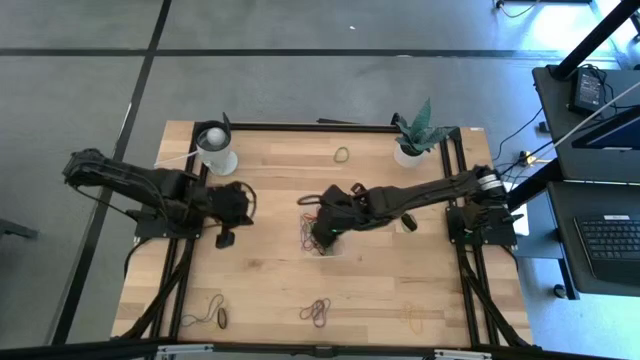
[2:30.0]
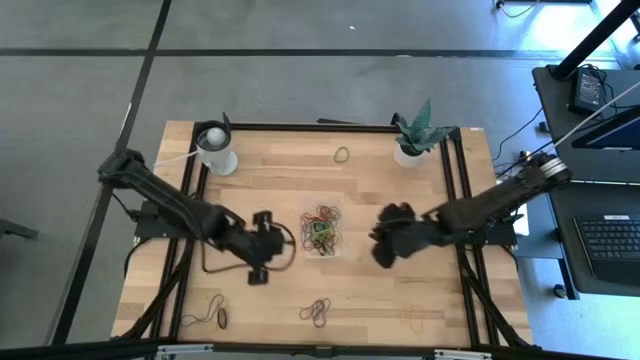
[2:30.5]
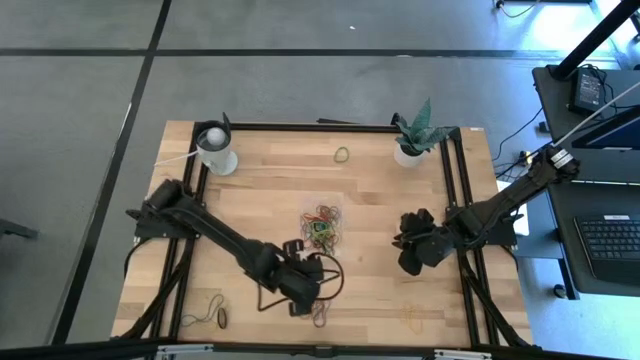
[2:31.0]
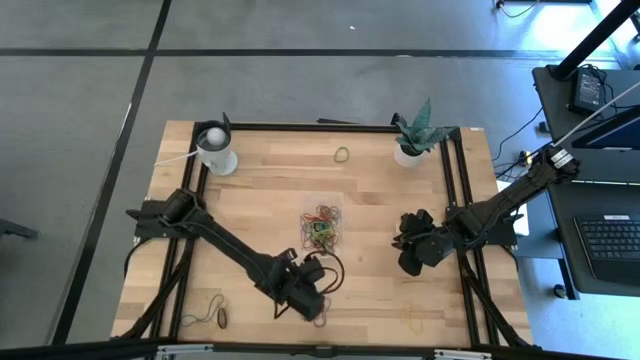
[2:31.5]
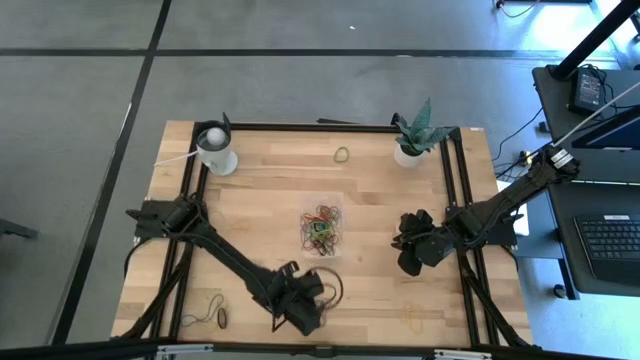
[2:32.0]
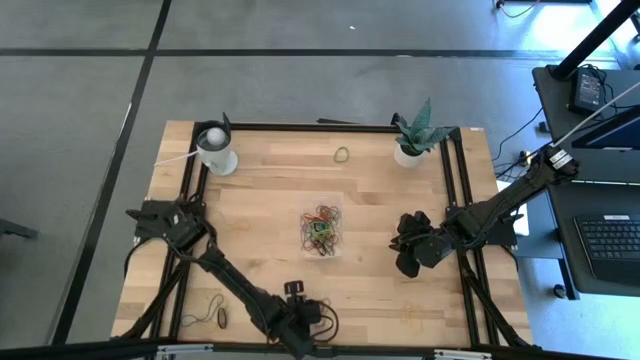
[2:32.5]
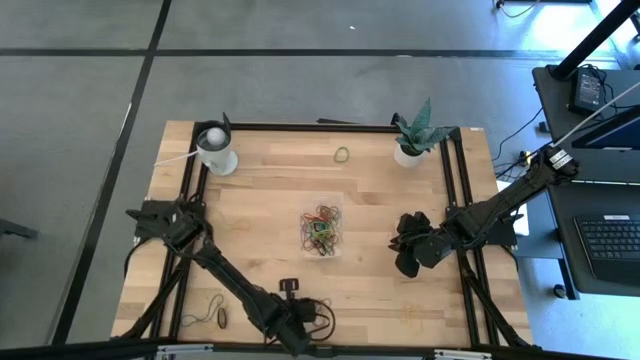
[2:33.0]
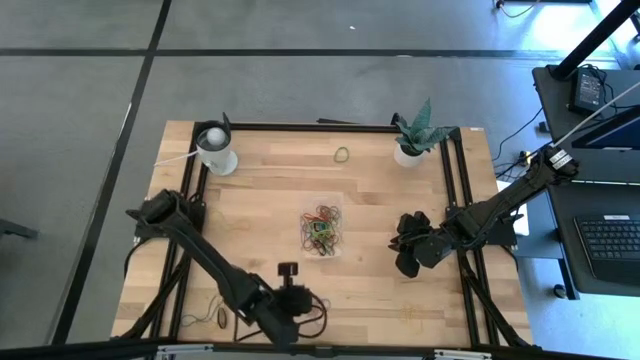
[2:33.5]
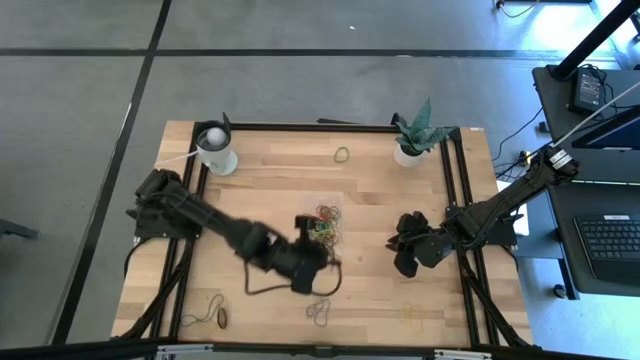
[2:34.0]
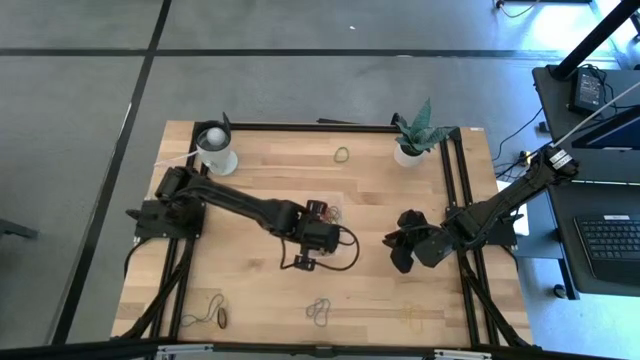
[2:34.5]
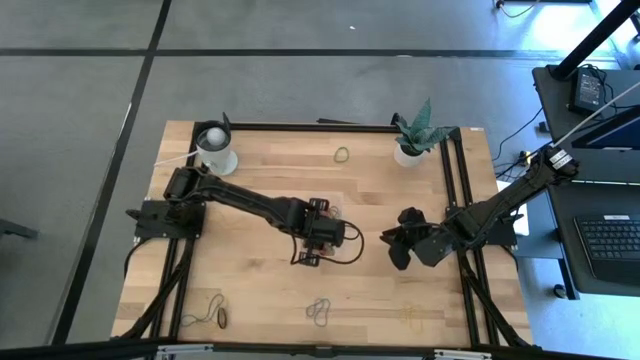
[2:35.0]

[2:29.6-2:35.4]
Task: Pick and place rubber bands into bin
Put the red rubber band into the transparent bin

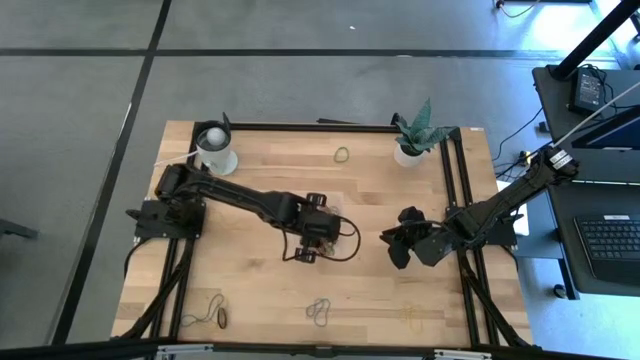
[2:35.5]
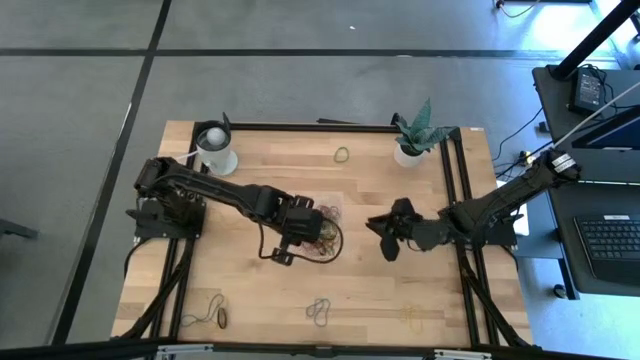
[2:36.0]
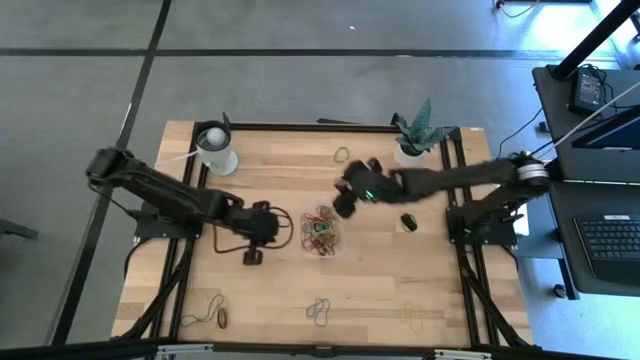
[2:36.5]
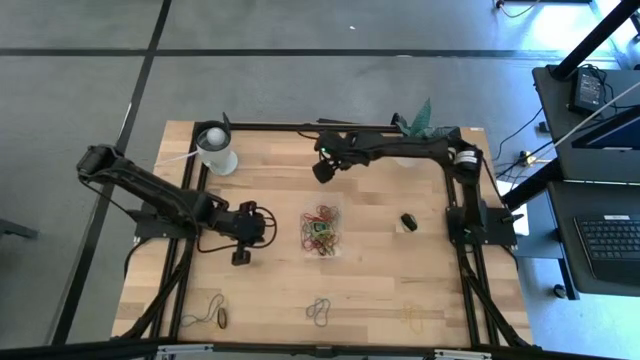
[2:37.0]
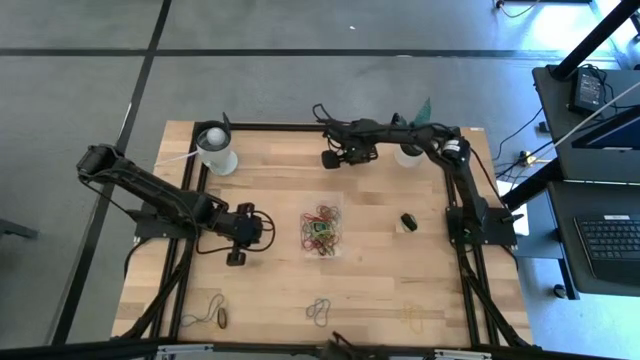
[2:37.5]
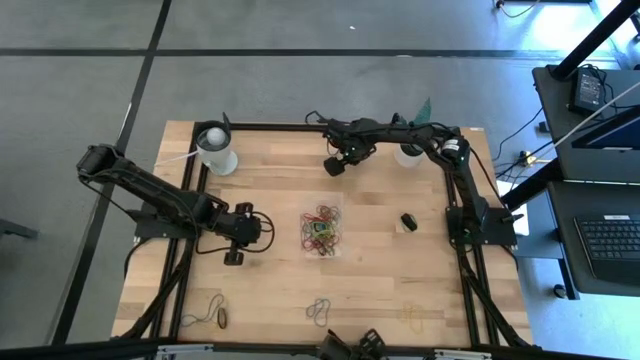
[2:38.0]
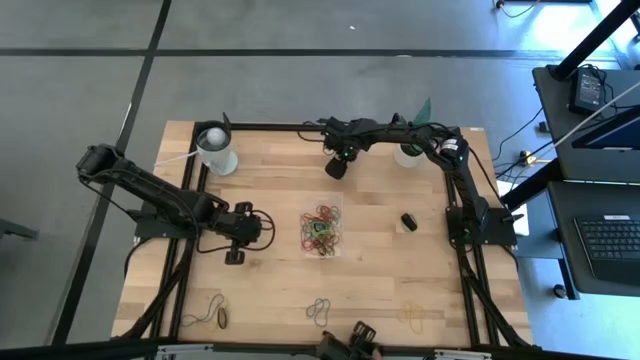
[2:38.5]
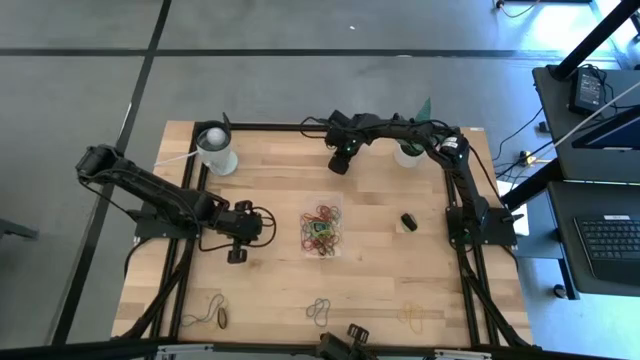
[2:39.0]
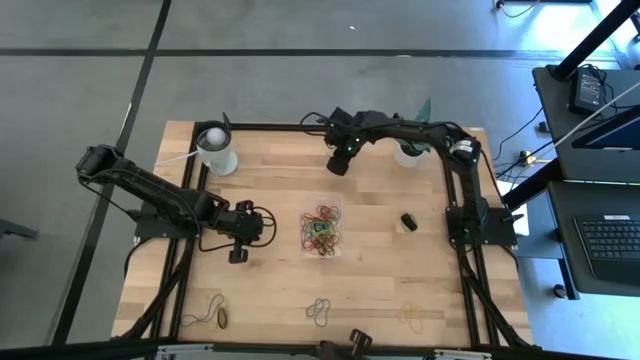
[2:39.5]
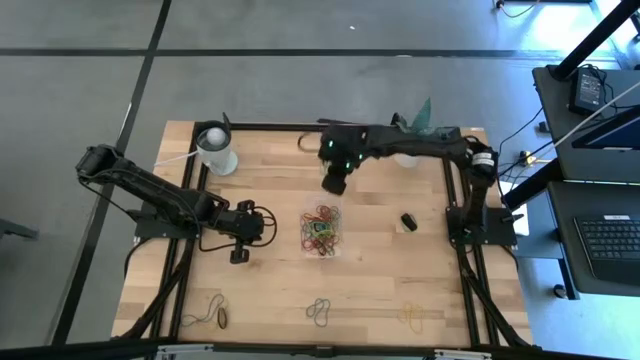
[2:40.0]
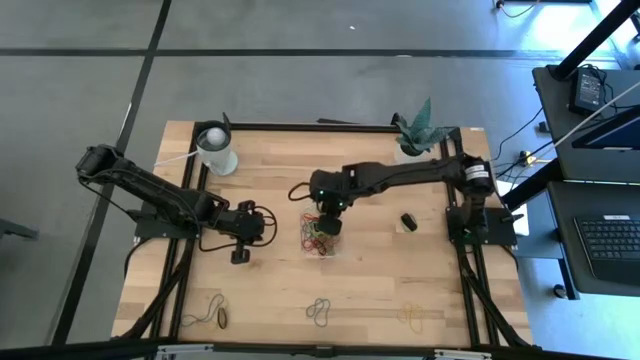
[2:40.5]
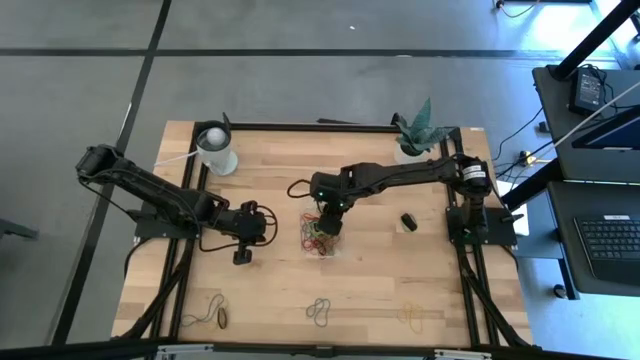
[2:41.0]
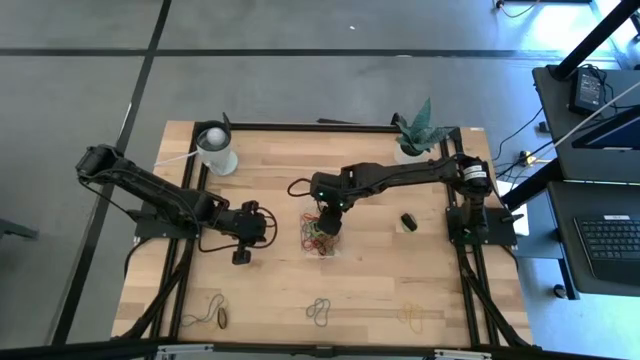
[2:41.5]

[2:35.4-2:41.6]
Put the green rubber band into the transparent bin

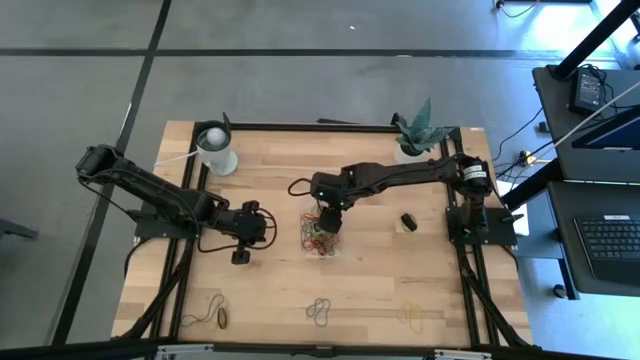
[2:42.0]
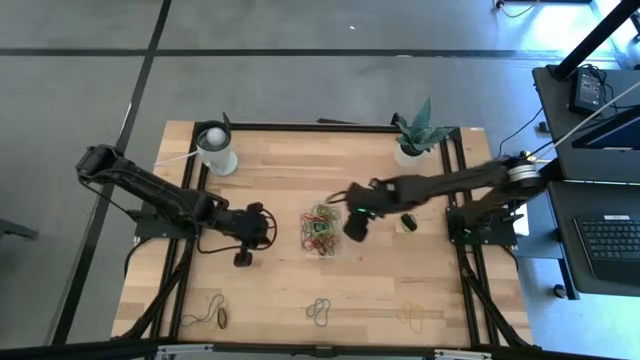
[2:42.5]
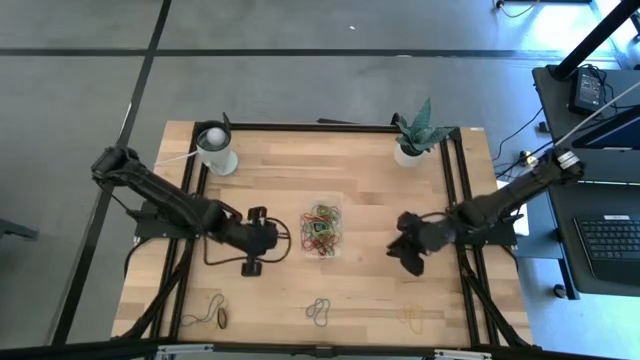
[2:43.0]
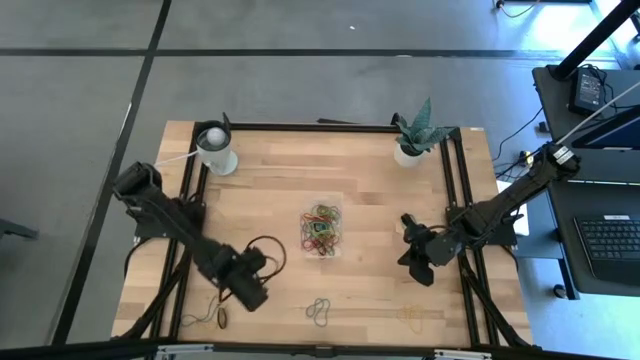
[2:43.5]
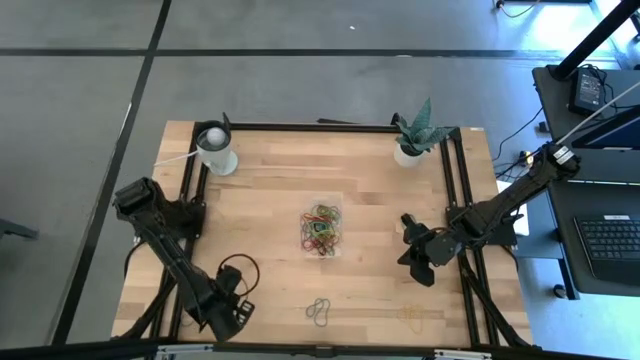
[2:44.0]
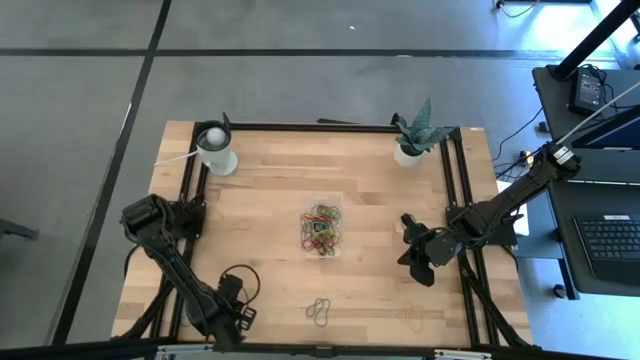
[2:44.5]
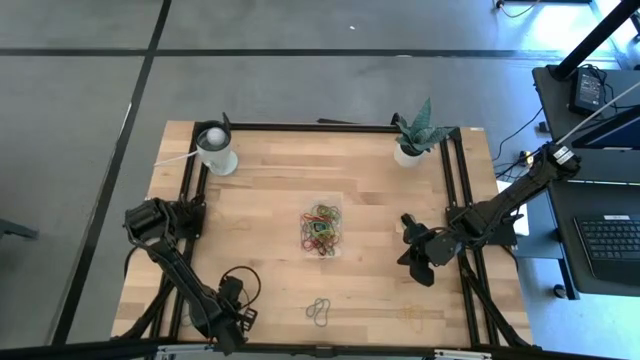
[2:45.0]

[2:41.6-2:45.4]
Put the yellow rubber band into the transparent bin

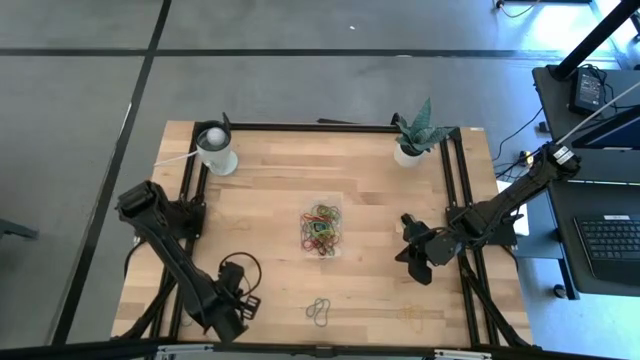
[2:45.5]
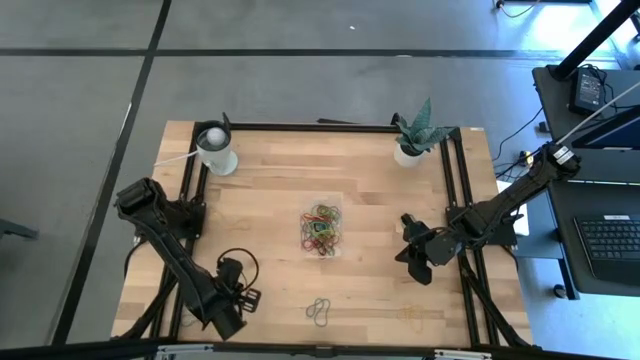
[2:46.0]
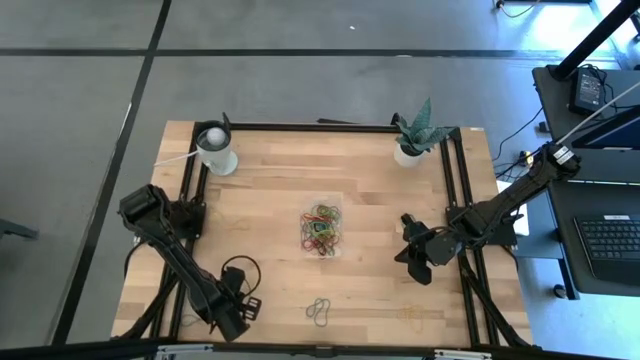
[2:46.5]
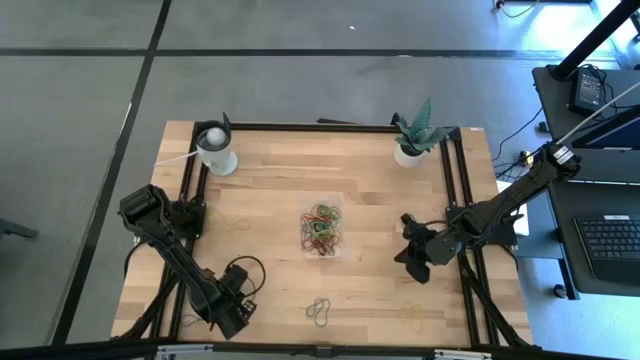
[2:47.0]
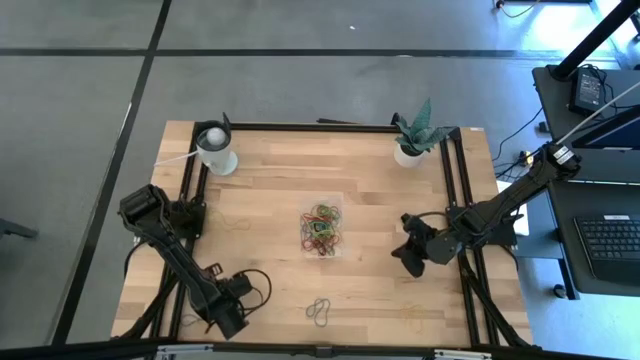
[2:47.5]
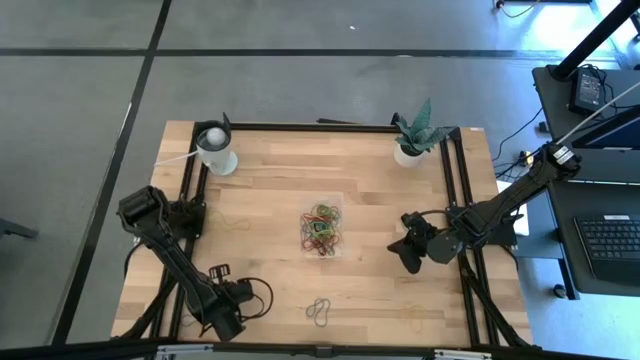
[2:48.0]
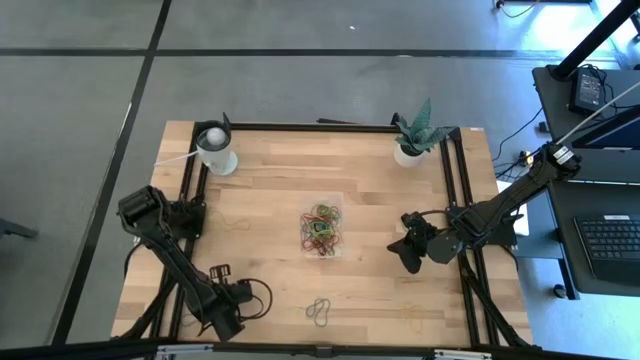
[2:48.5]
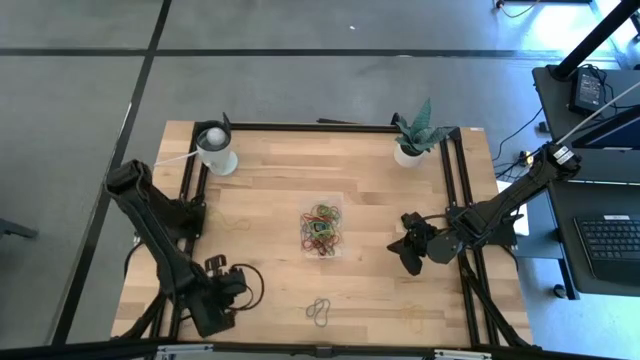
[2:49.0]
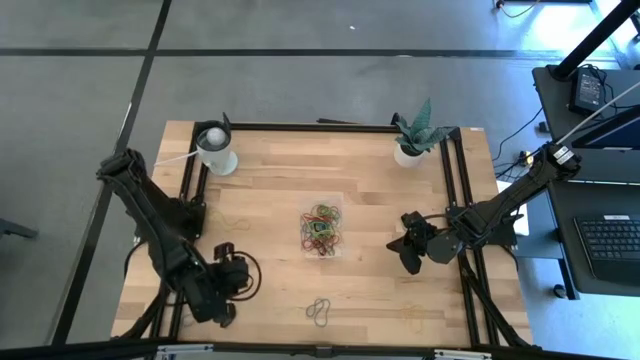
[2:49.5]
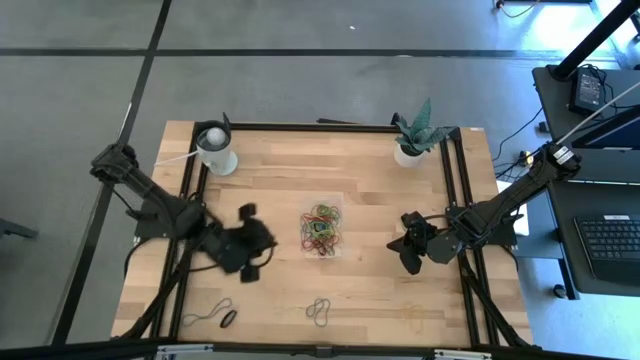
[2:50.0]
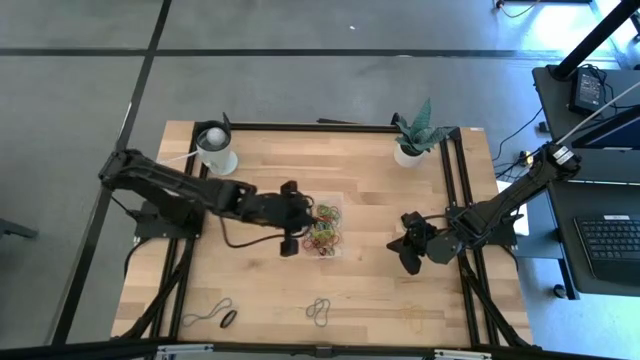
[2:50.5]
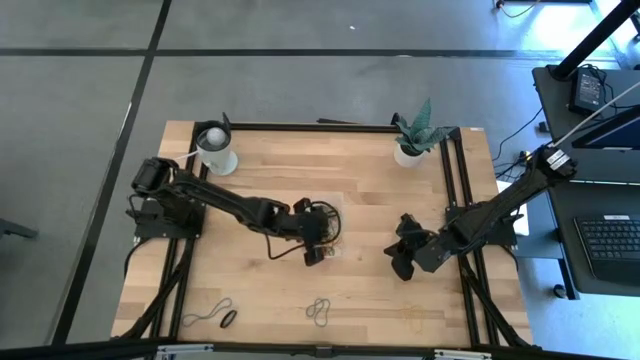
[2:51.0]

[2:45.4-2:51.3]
Put the yellow rubber band into the transparent bin
